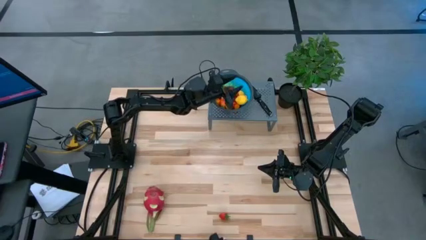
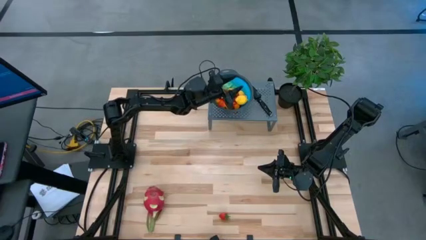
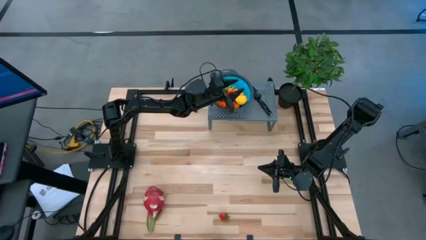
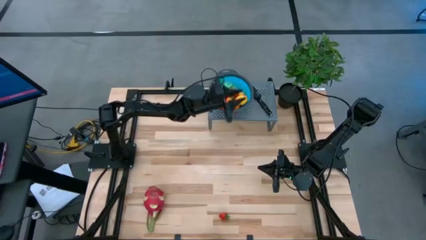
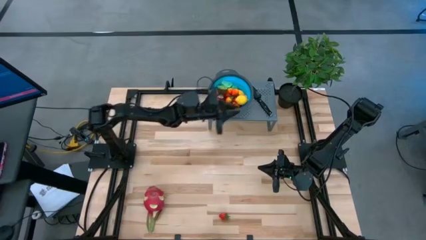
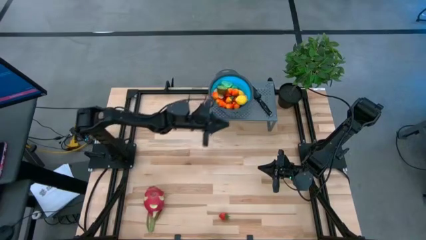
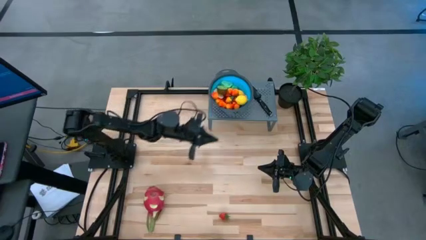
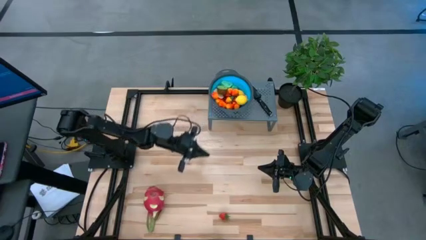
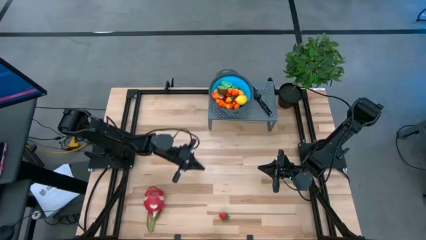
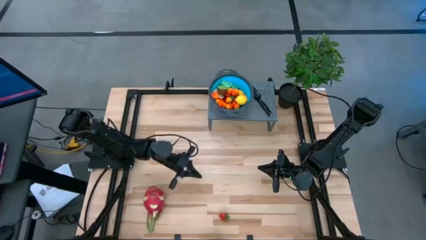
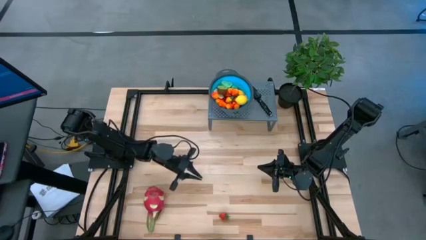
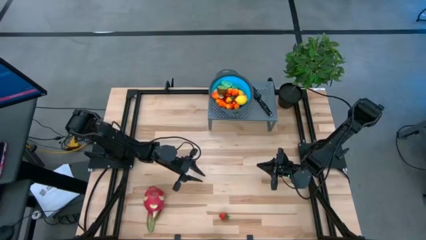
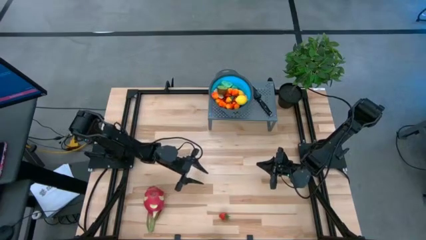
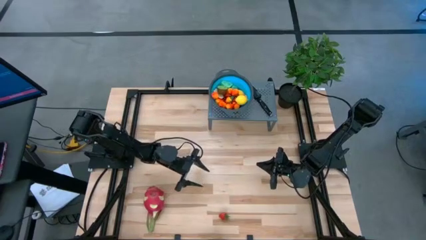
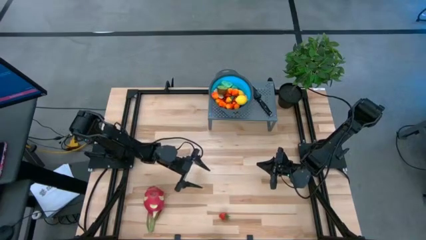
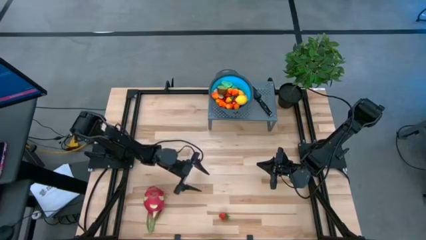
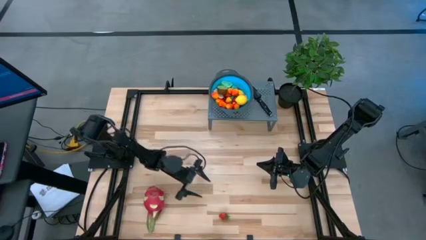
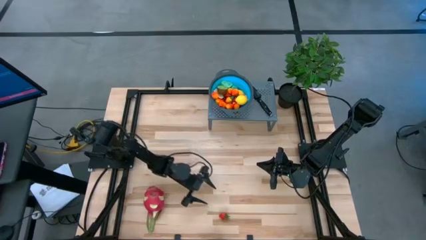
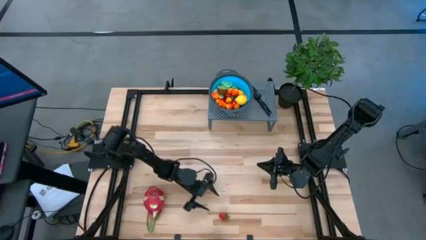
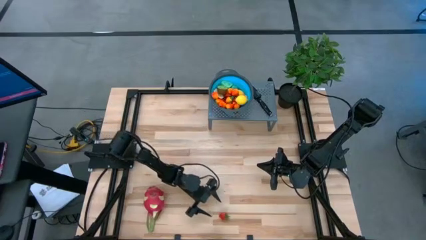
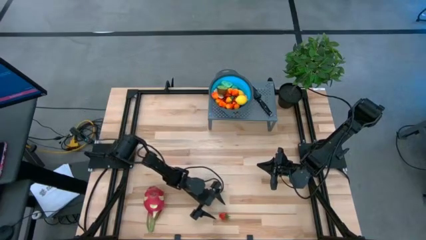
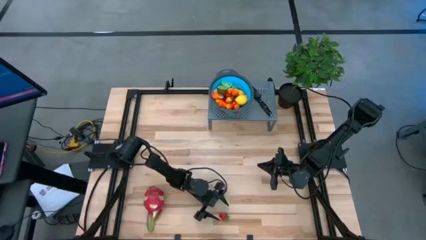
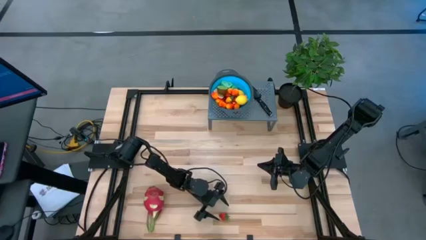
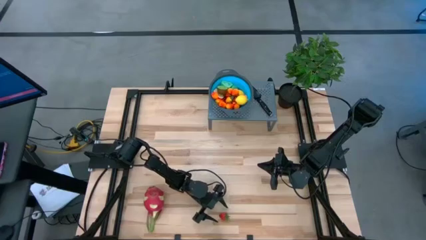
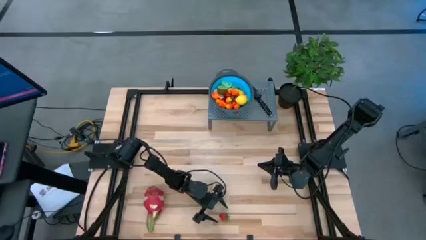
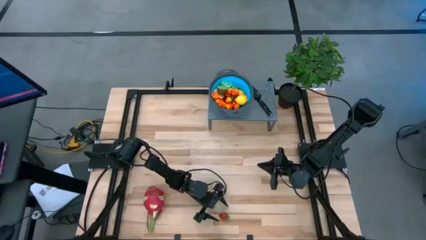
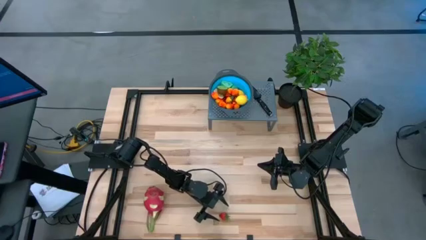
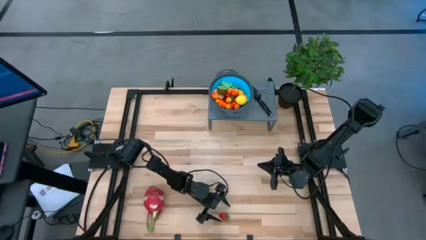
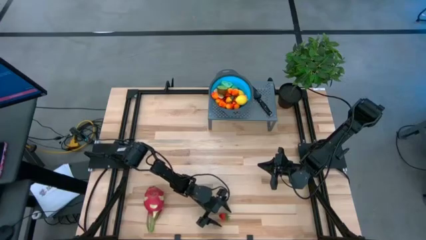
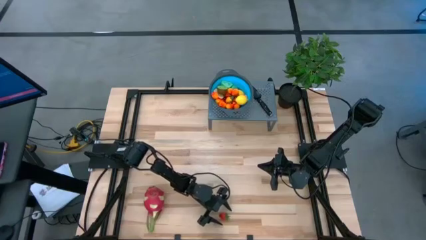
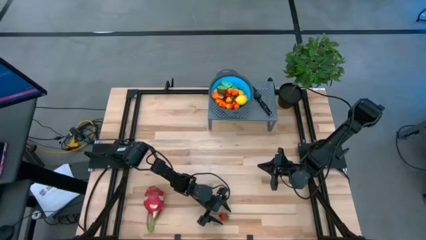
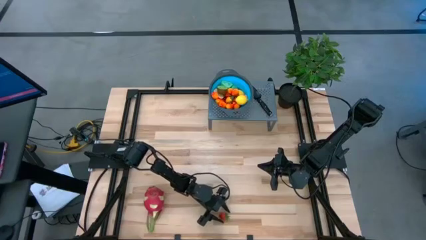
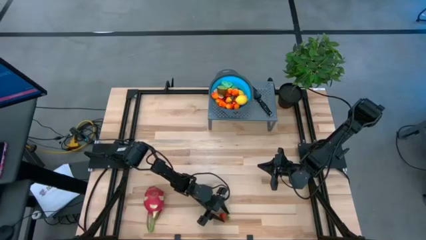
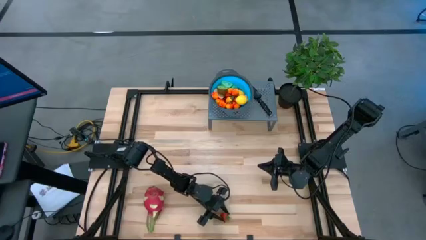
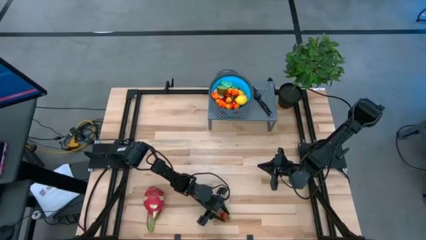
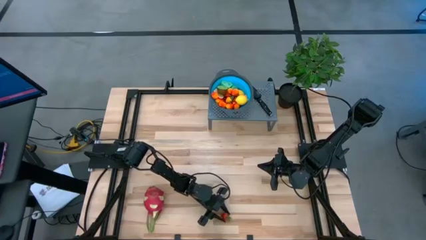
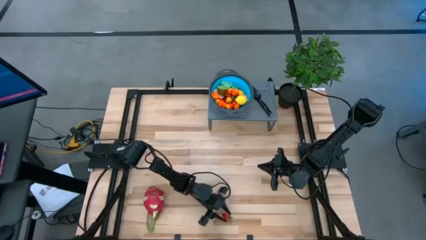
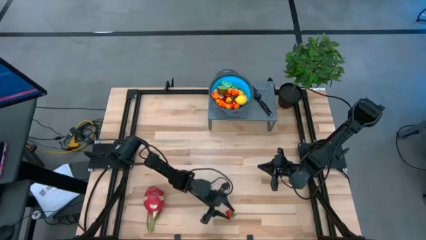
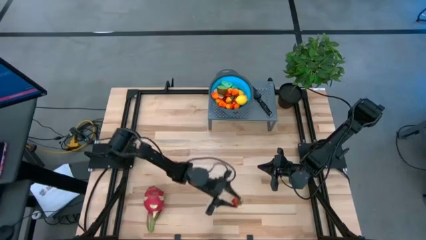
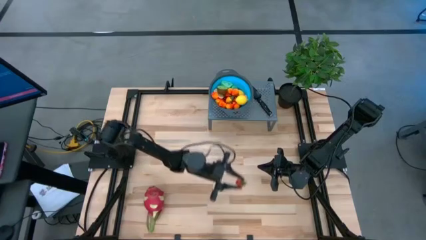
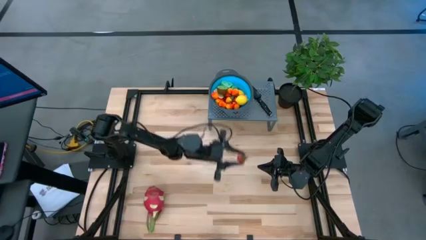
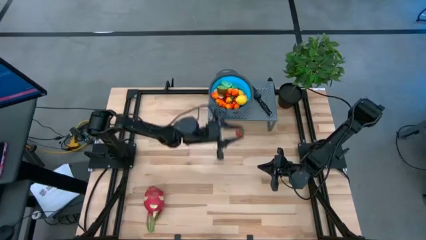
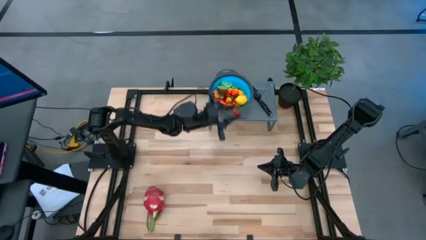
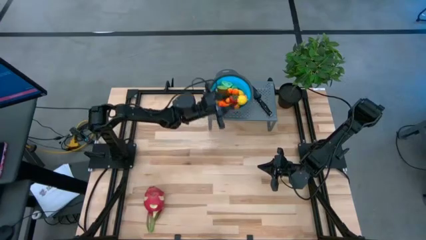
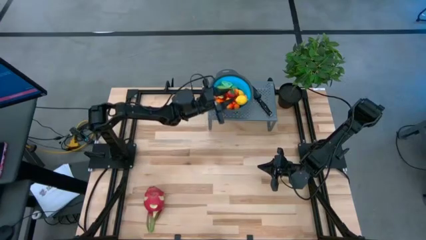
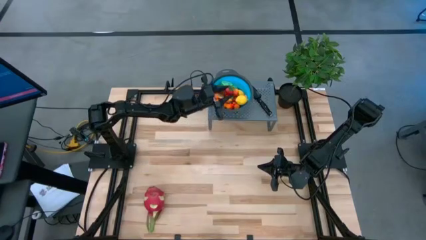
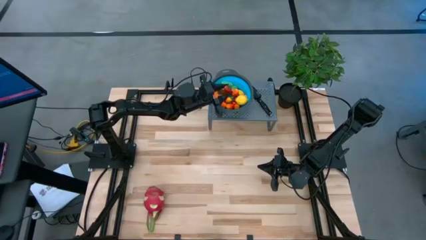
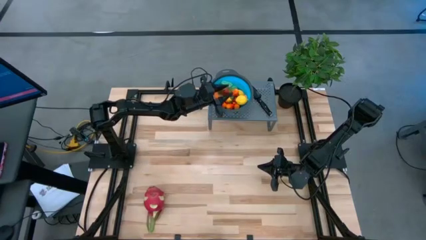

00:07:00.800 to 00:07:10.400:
Task: Pick & Place Fruit
Put the strawberry into the strainer bowl

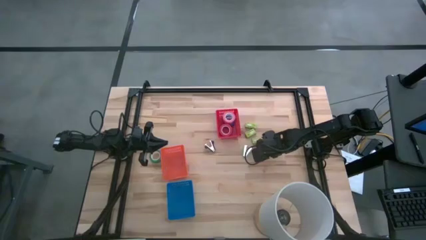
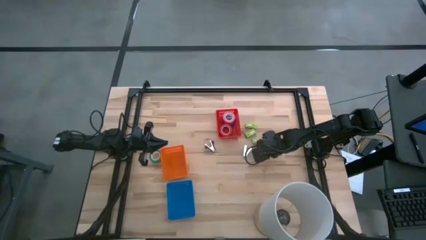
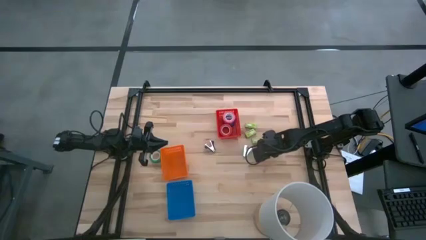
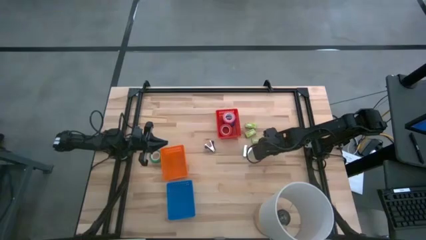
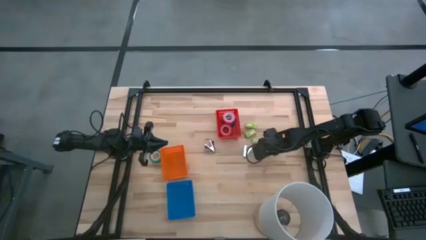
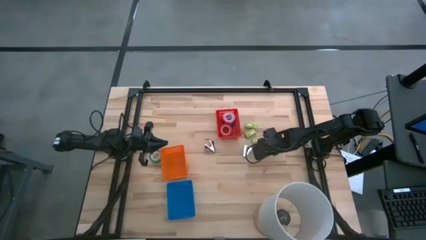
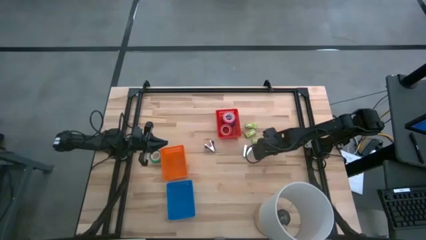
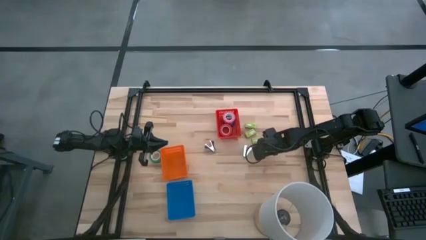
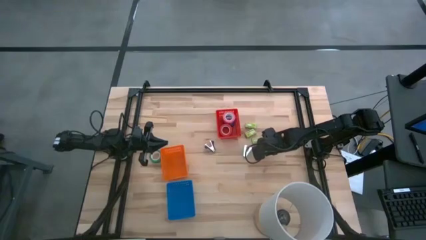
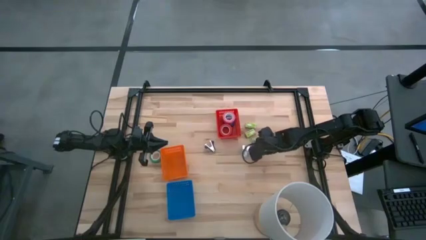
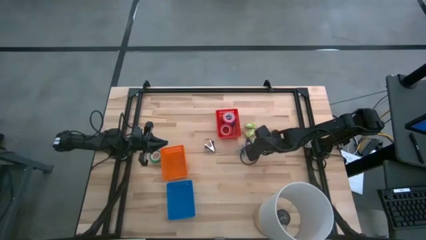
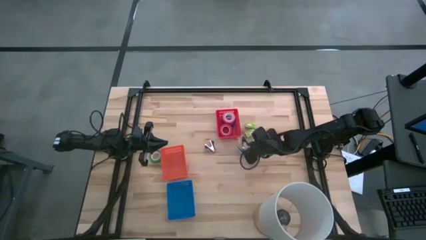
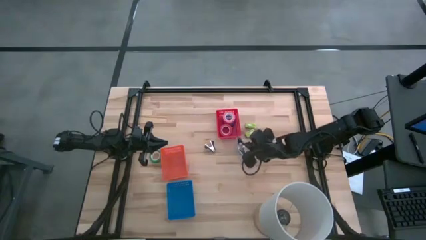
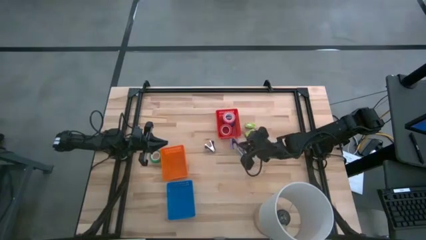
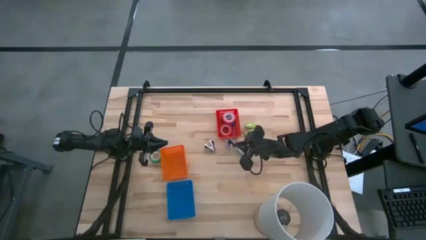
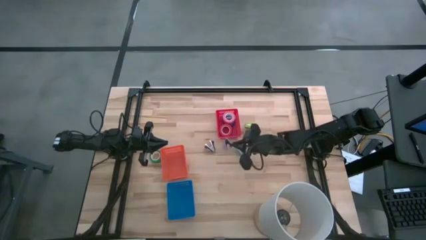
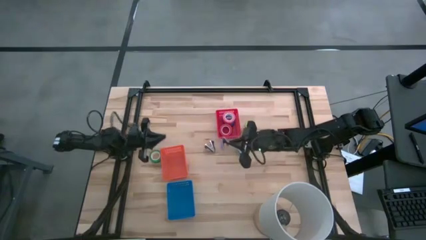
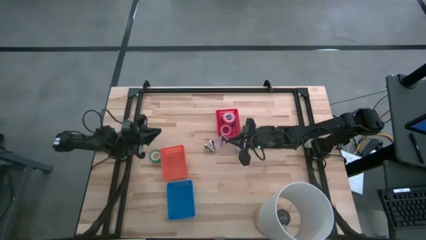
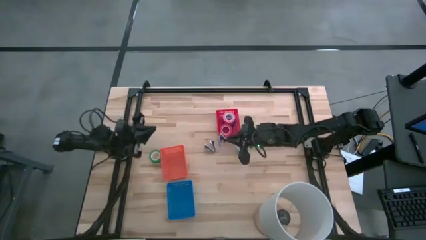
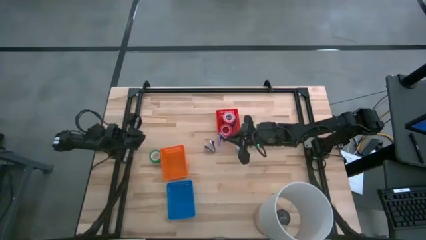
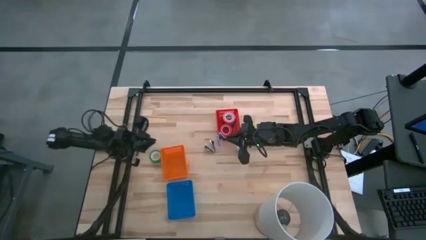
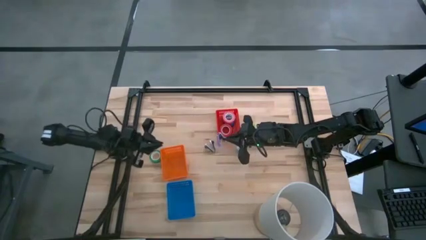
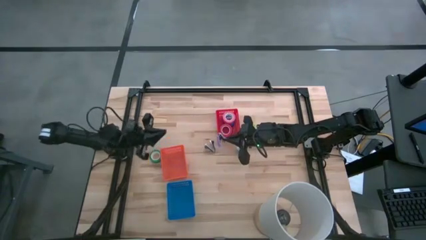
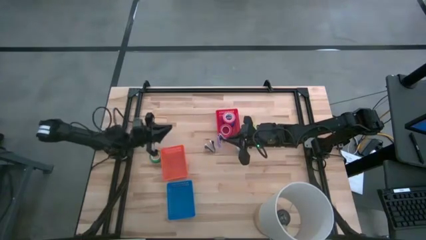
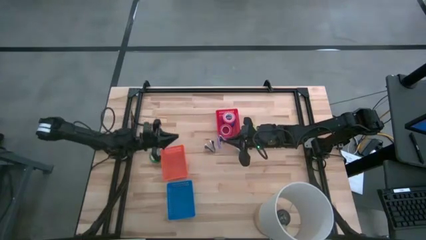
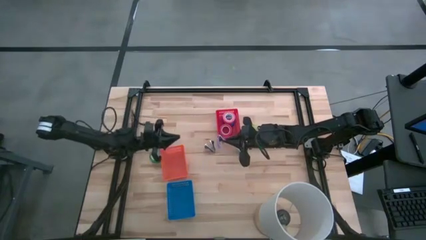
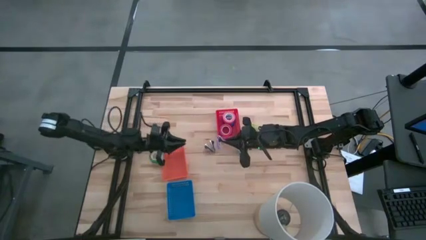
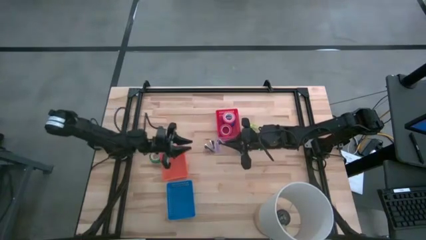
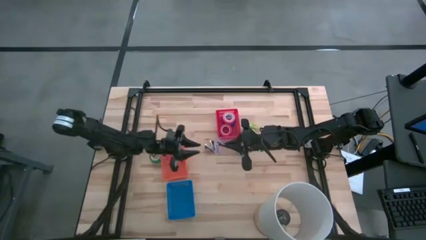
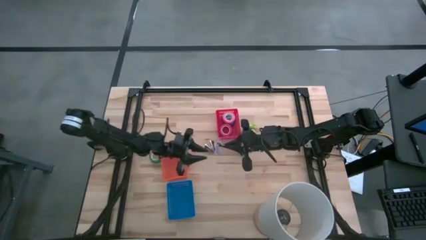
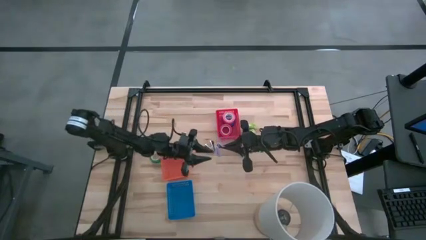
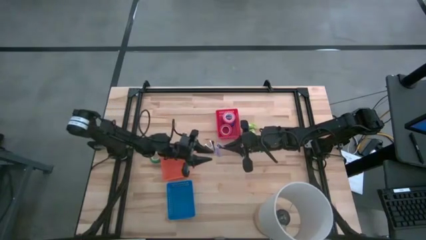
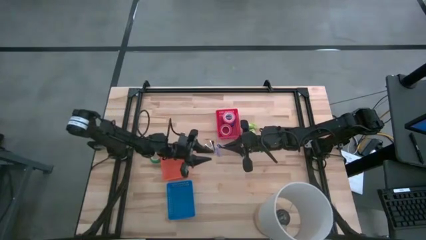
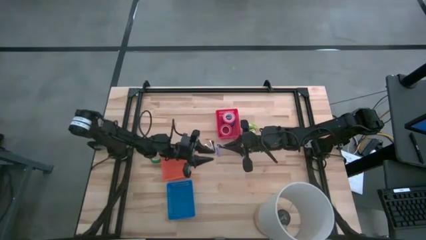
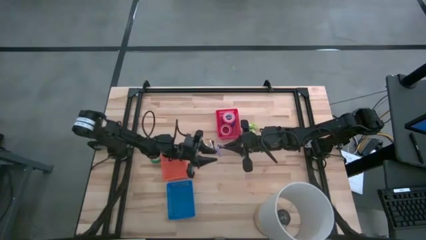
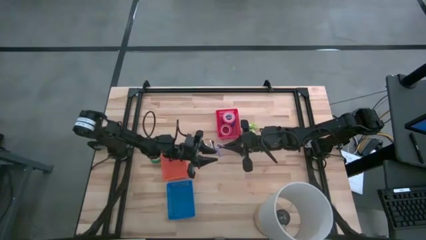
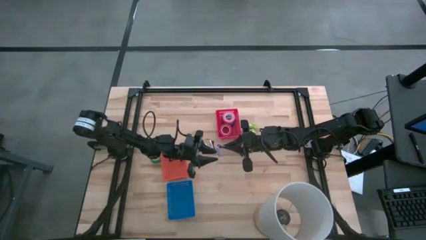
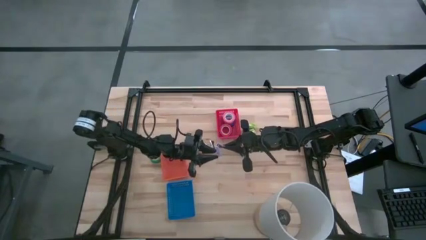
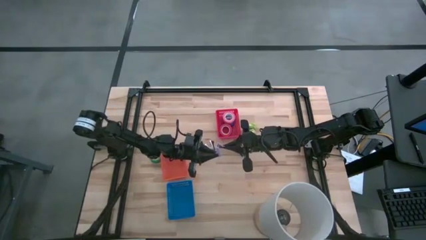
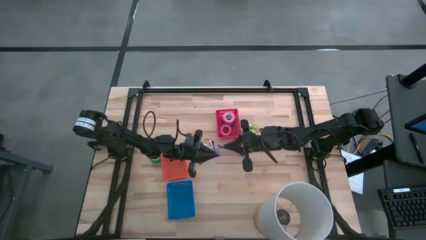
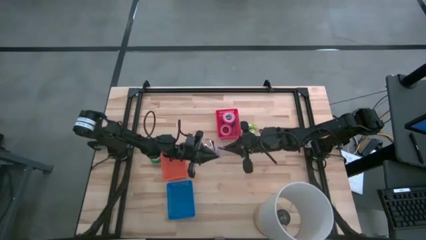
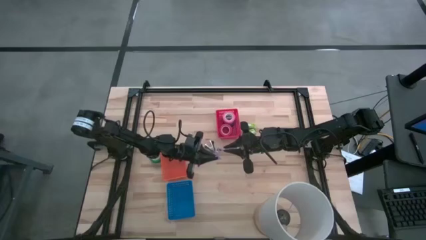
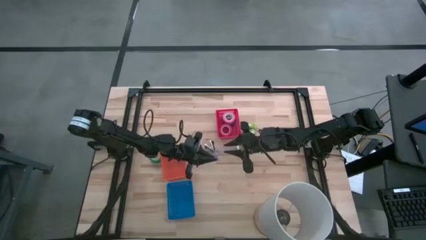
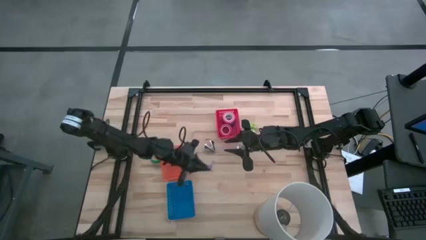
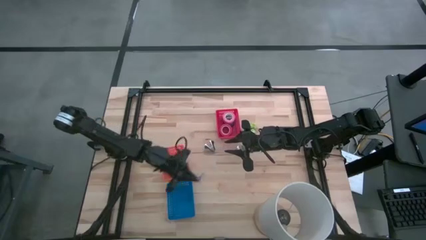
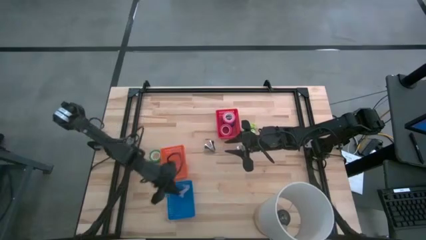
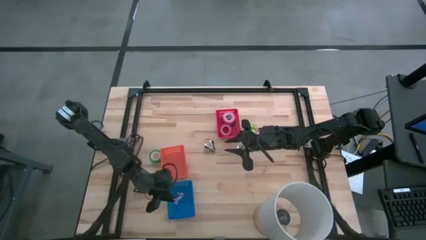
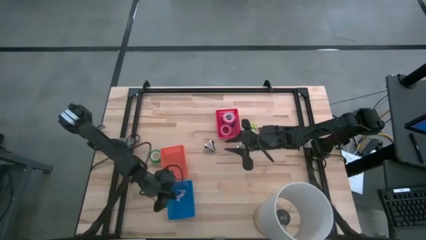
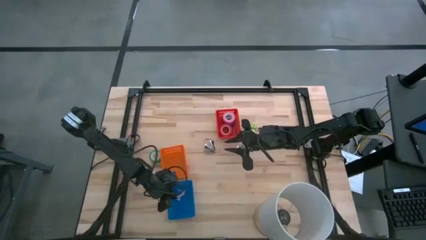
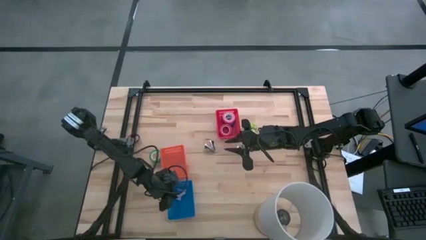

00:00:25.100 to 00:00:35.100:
Task: Pick and place Stapler, Stapler remover, tape
Put the purple staple remover into the blue bin
